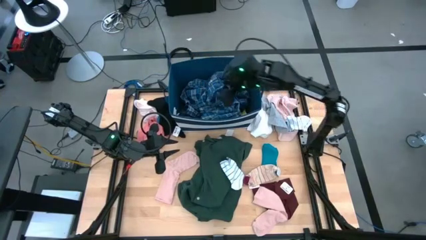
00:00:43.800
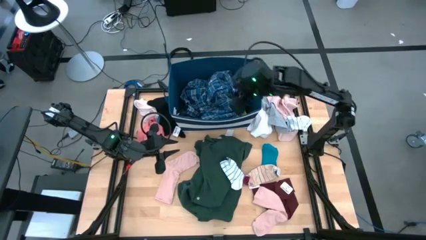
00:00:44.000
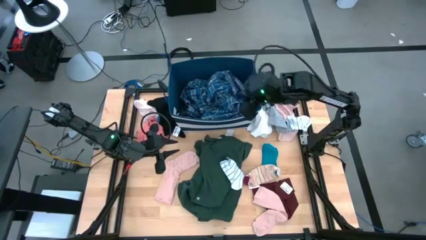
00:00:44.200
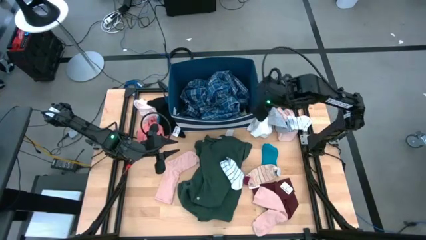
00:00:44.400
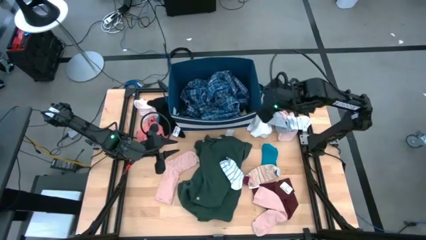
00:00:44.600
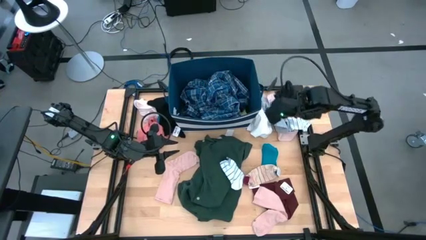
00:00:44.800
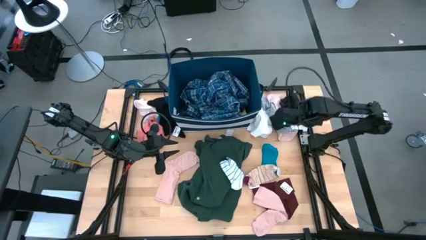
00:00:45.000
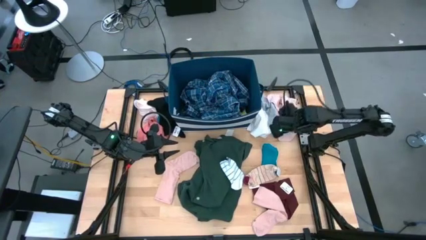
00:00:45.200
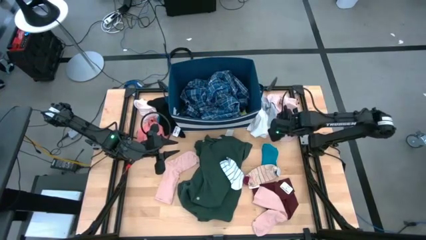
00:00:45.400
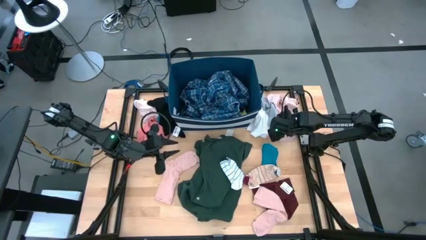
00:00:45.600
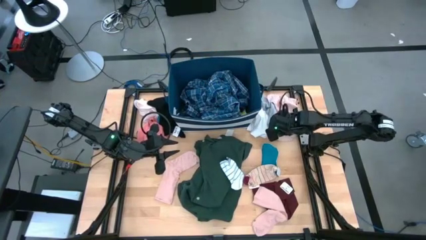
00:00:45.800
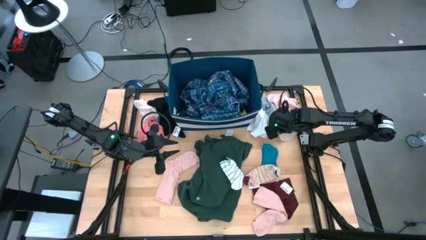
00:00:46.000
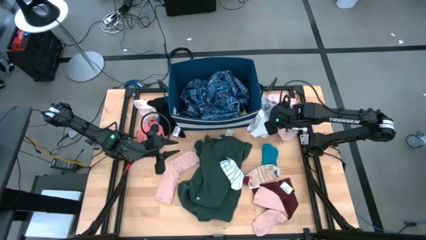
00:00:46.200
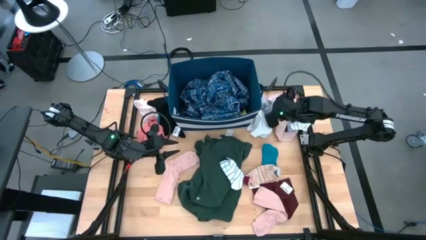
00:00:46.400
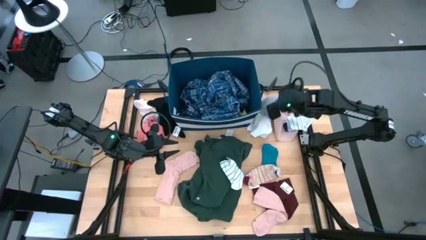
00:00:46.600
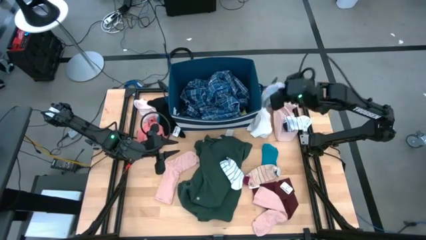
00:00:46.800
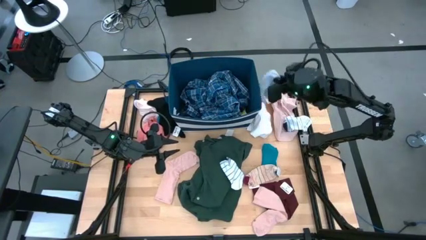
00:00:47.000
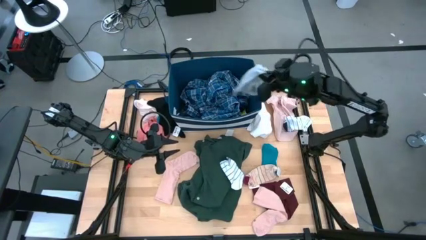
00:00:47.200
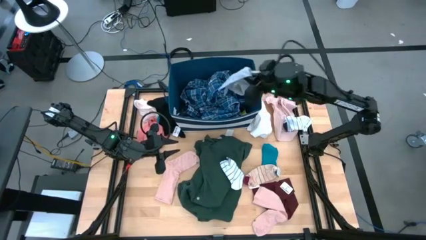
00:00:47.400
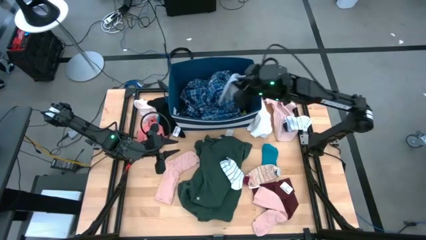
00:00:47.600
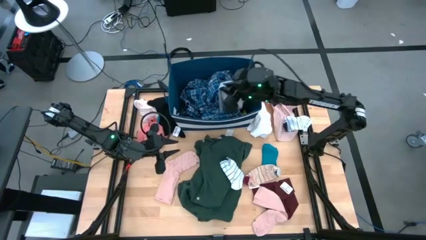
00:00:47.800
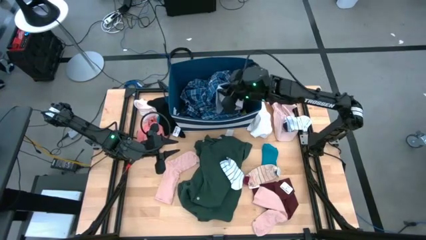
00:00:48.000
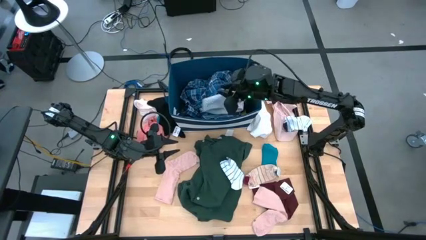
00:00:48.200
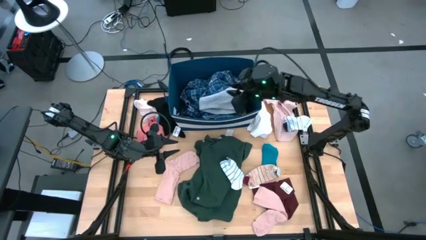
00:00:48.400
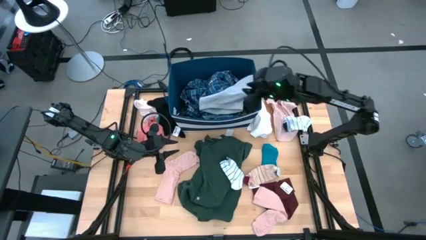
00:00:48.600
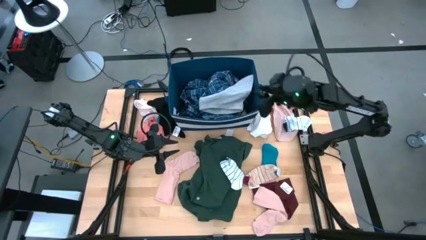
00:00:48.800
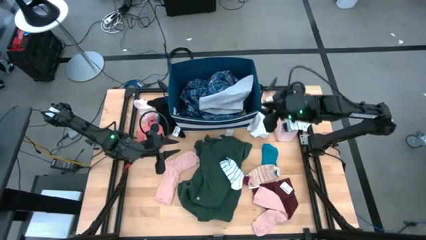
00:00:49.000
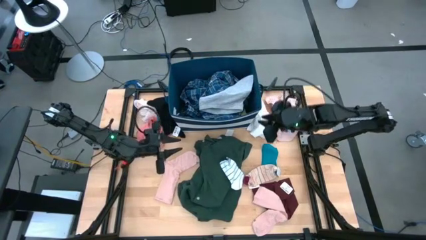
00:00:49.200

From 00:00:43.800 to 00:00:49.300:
Task: Sort clothes
Put the gray underwear into the blue laundry bin

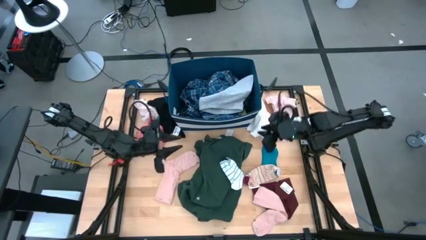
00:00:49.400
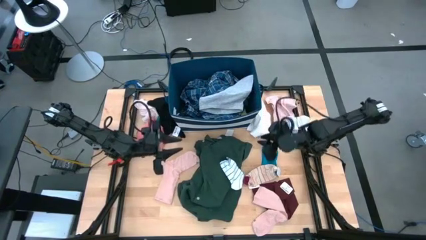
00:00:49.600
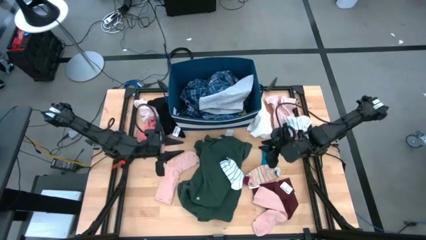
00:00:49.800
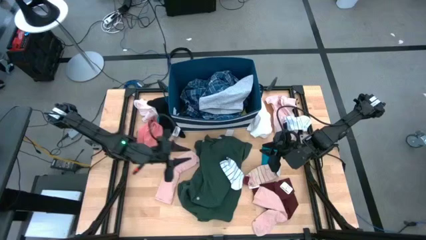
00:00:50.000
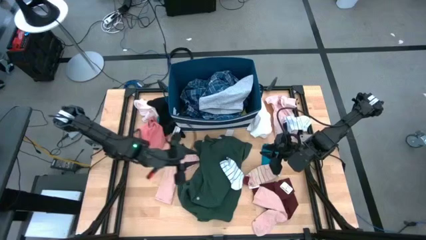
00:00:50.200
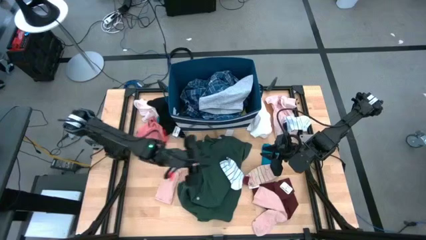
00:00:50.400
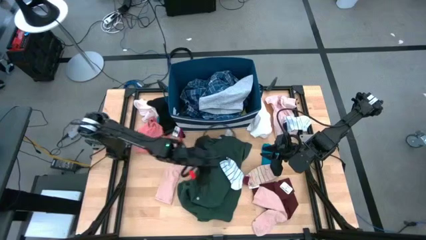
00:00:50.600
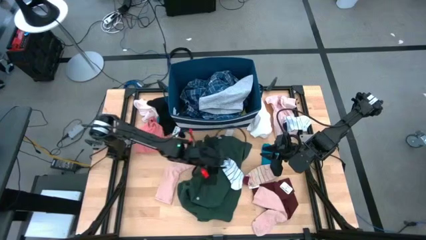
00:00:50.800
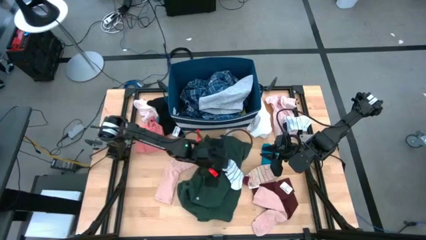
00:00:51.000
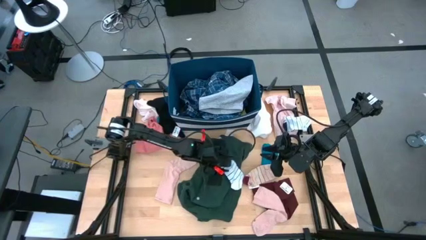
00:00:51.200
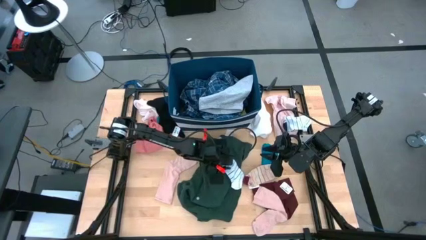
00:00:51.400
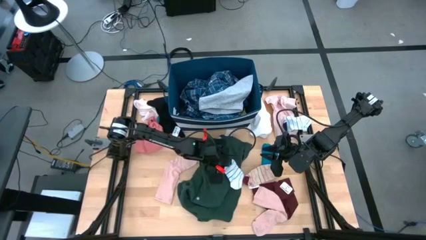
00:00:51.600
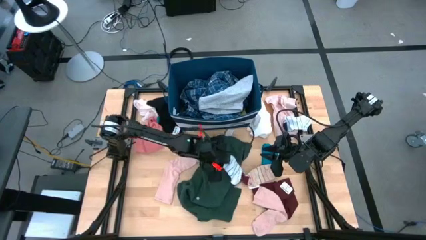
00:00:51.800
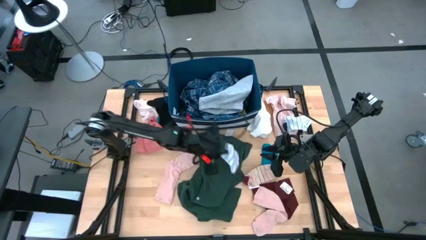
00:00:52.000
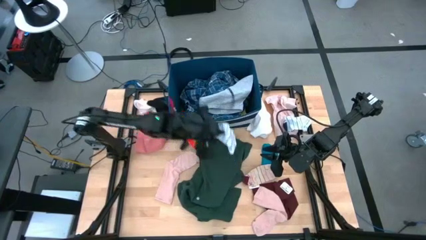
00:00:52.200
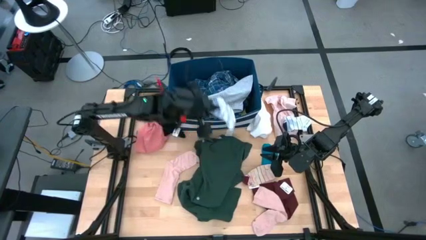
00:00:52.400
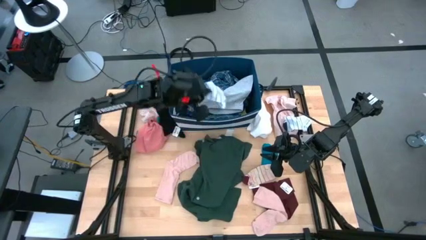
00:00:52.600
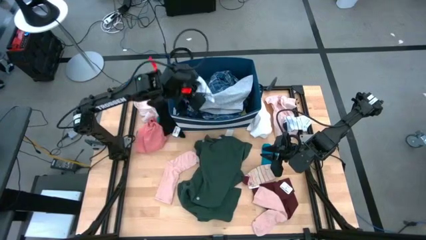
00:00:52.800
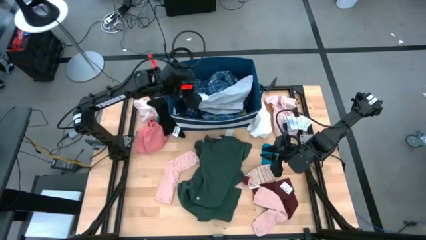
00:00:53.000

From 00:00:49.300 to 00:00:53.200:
Put the white sock into the blue laundry bin

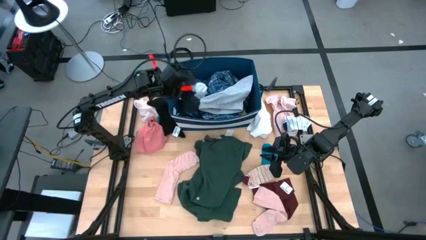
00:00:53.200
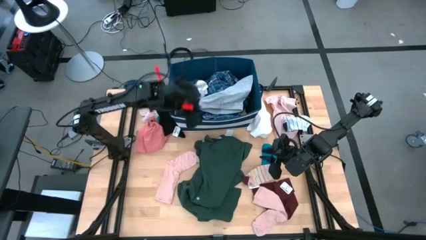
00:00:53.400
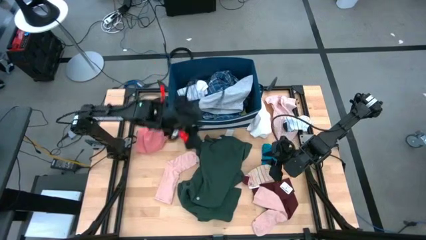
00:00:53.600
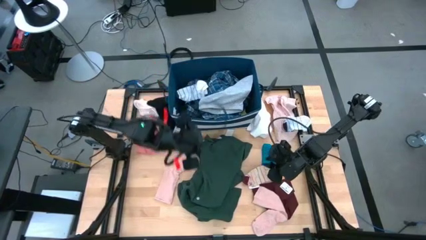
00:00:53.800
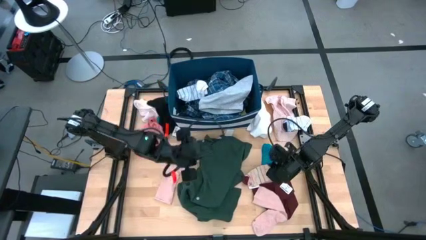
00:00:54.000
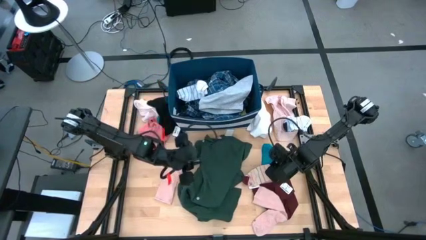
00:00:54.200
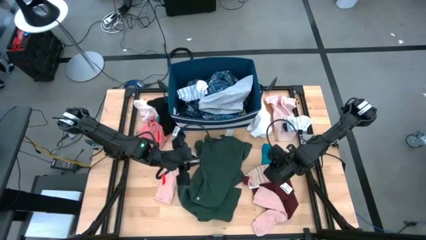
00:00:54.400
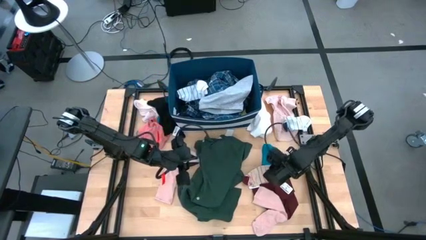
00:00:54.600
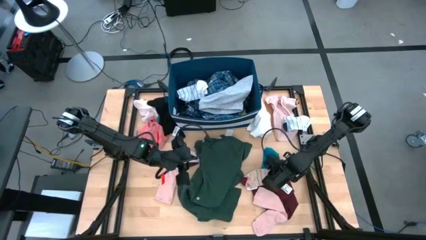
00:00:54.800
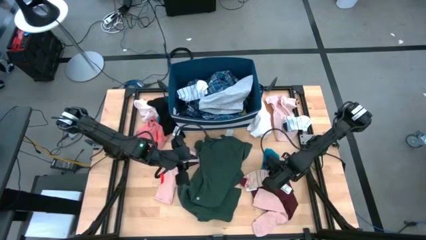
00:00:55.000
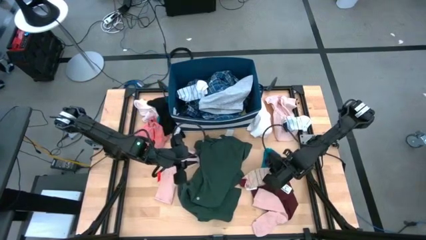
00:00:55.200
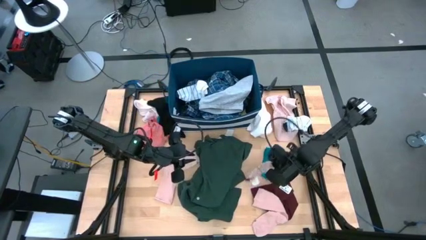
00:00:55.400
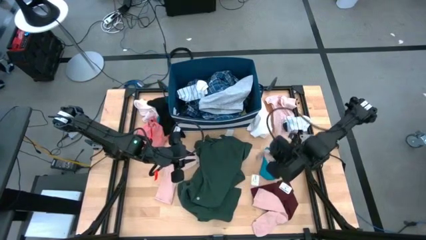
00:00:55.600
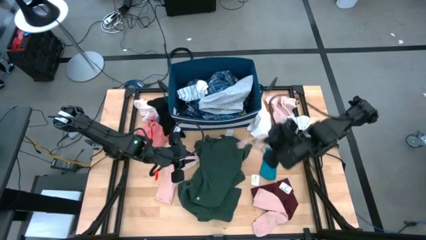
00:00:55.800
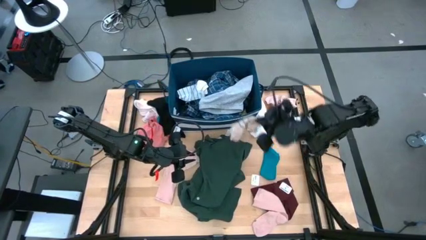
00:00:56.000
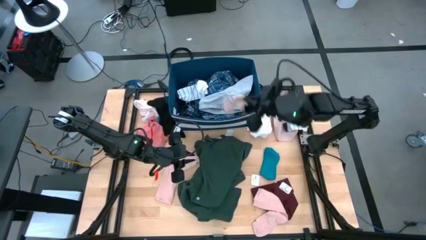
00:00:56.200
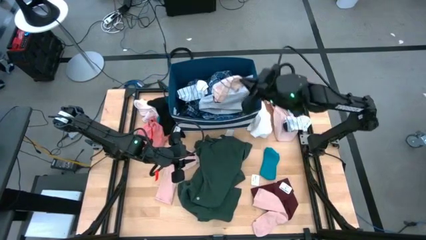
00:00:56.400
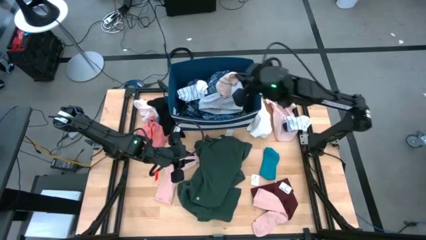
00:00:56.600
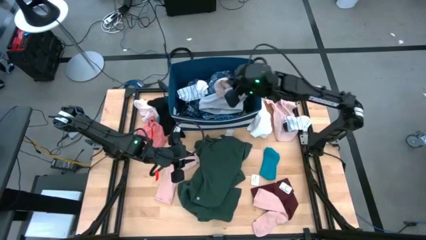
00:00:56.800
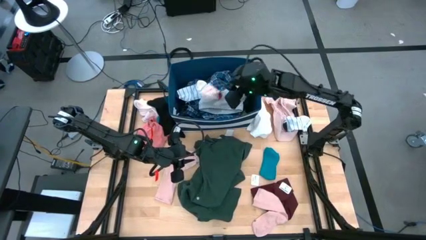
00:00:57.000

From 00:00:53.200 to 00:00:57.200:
Put the light brown sock into the blue laundry bin

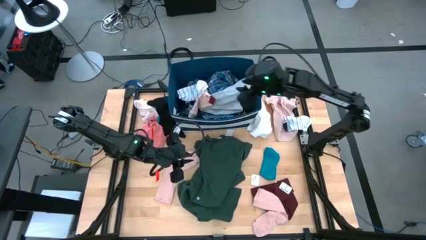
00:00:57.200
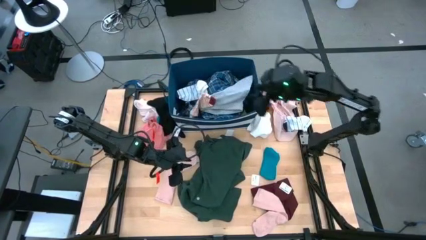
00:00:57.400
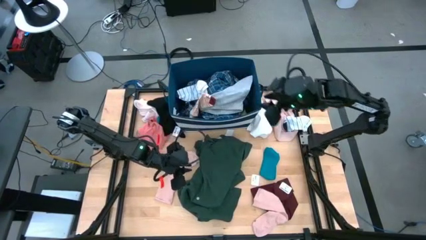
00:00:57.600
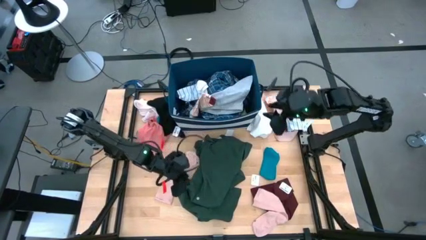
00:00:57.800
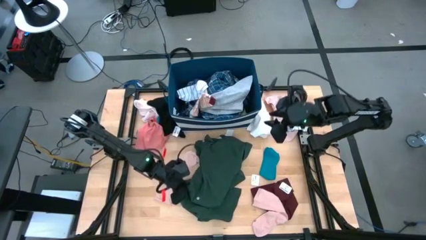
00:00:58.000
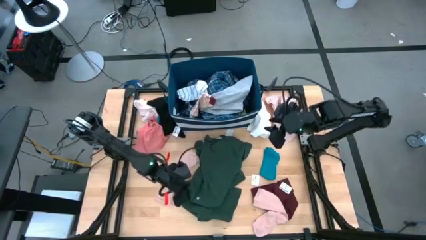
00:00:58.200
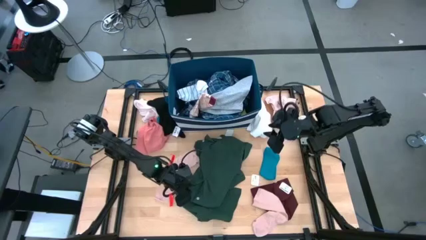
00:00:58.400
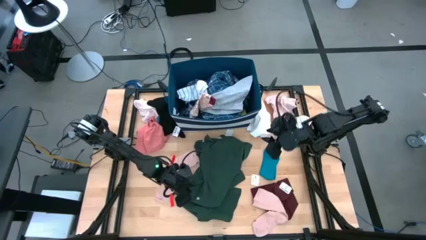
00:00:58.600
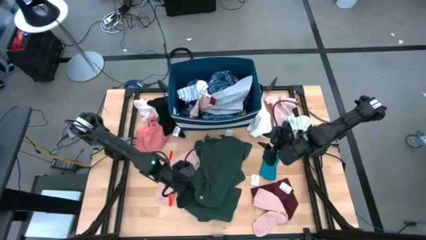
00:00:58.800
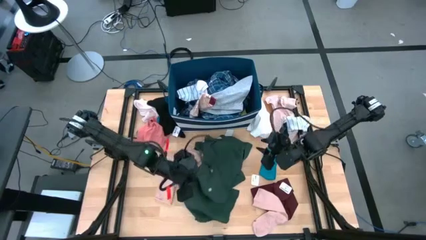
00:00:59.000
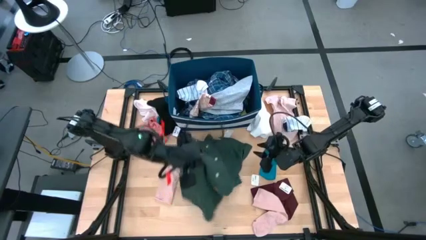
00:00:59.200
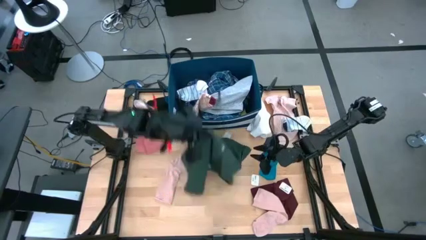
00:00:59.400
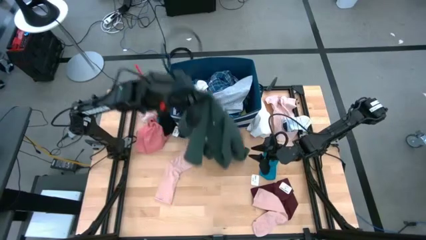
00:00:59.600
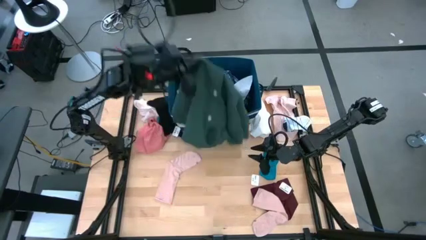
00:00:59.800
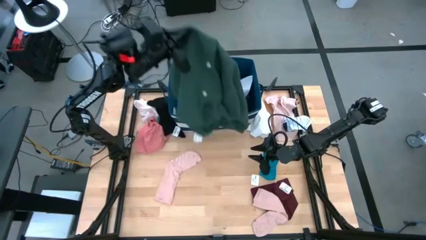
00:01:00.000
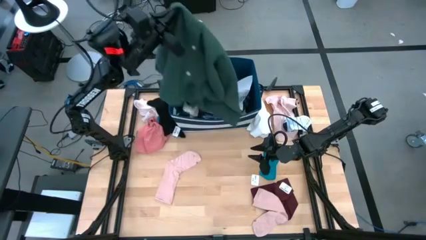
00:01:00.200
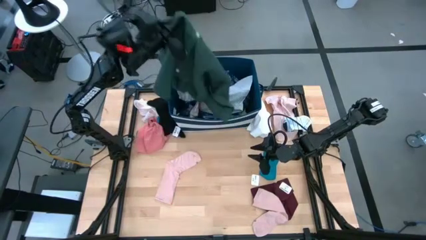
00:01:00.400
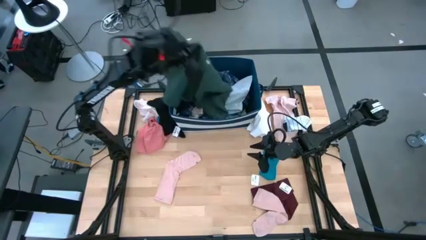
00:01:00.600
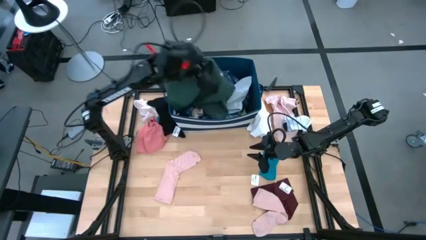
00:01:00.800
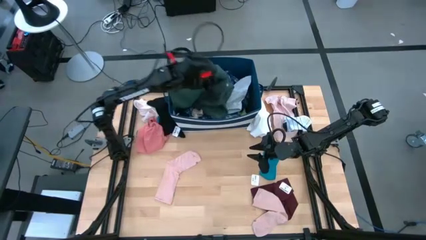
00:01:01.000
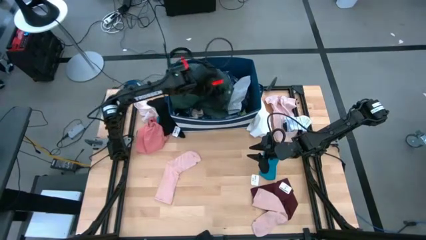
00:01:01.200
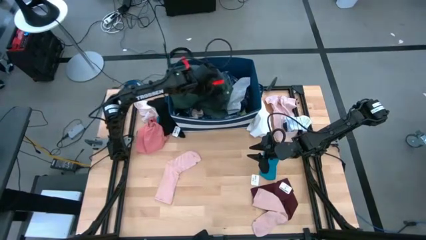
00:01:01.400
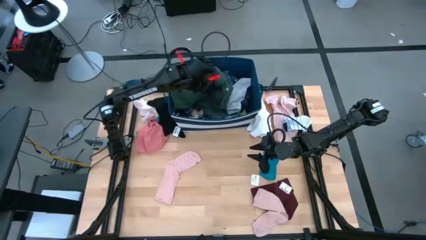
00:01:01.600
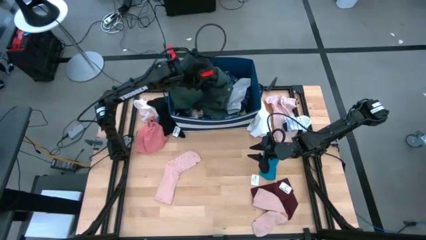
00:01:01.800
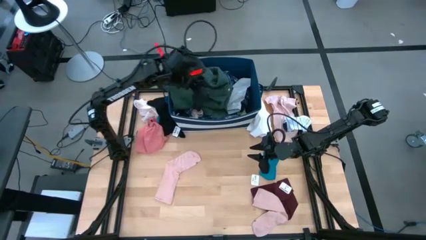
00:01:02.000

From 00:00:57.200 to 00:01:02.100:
Put the green polo shirt into the blue laundry bin
